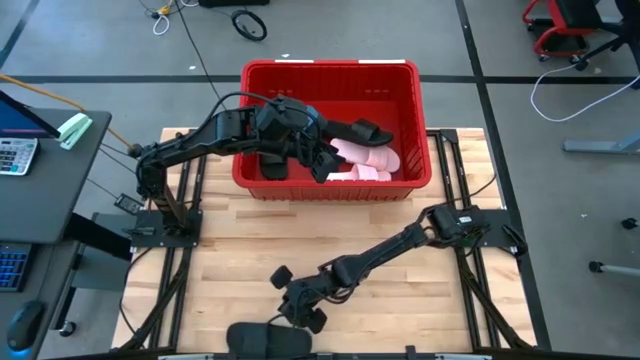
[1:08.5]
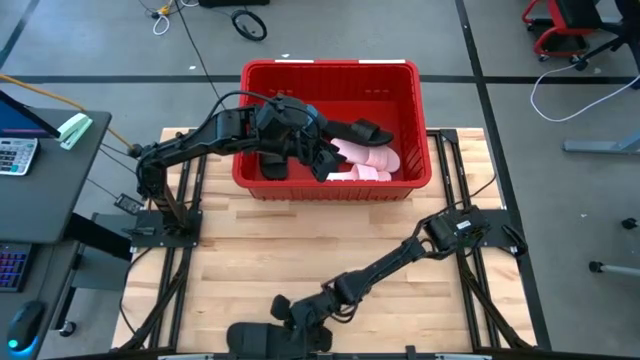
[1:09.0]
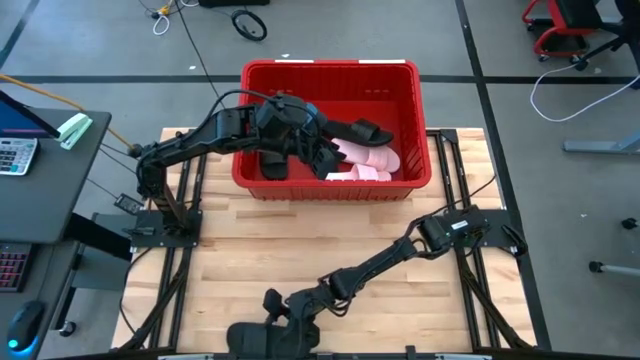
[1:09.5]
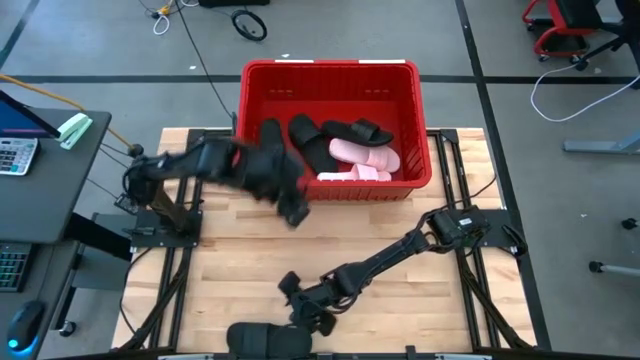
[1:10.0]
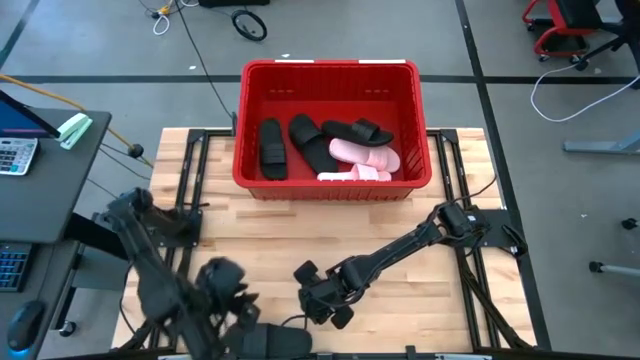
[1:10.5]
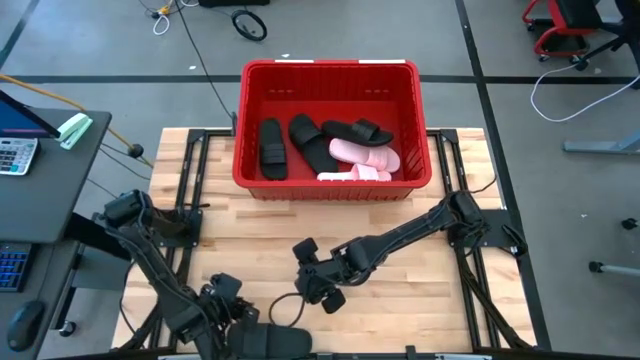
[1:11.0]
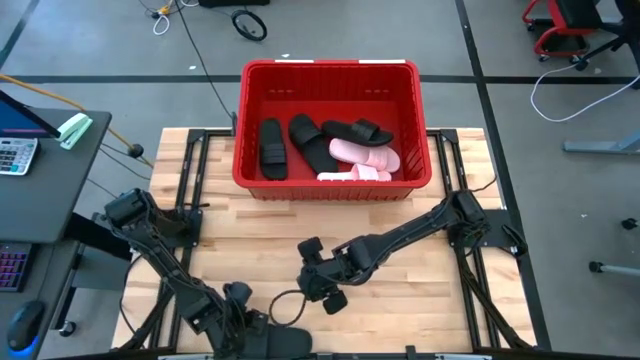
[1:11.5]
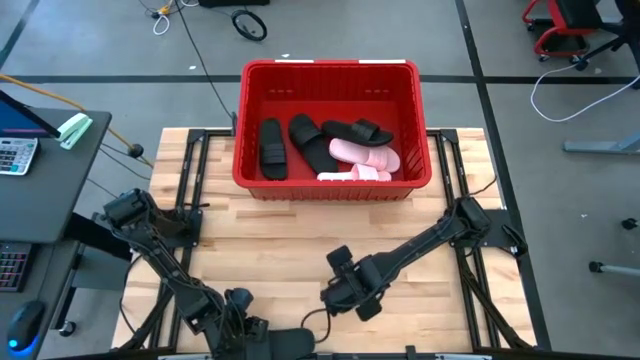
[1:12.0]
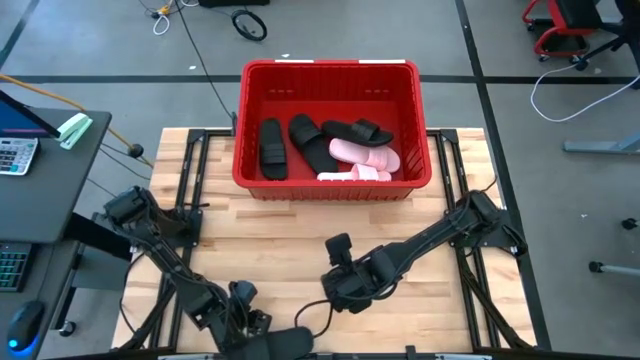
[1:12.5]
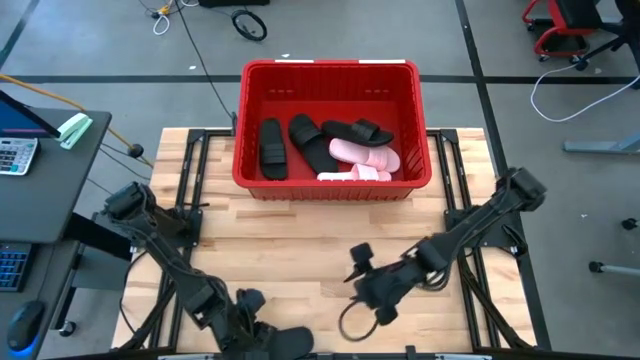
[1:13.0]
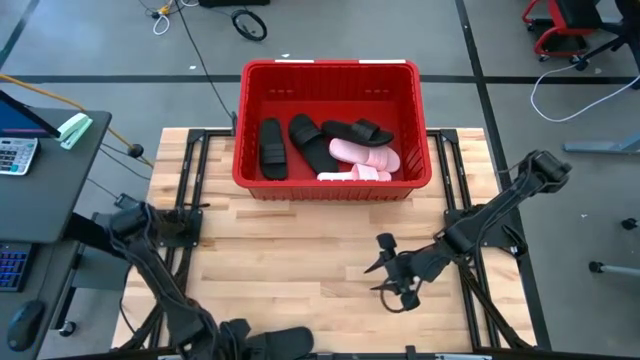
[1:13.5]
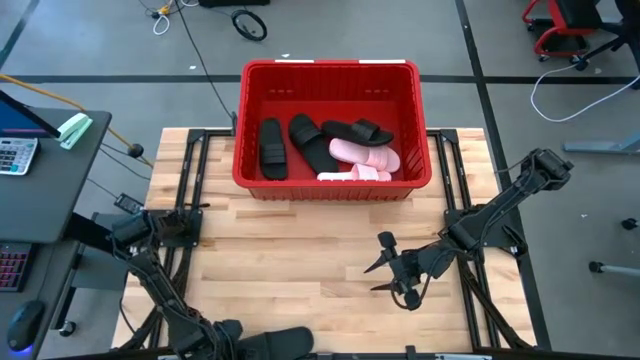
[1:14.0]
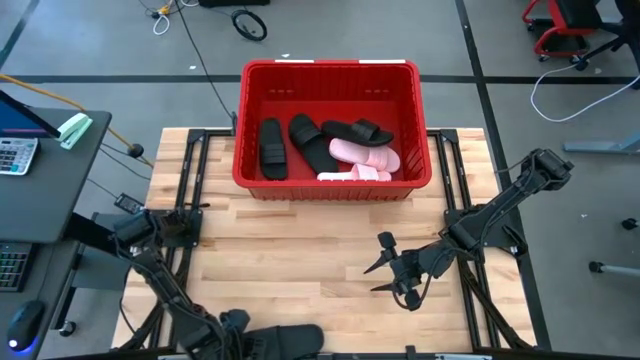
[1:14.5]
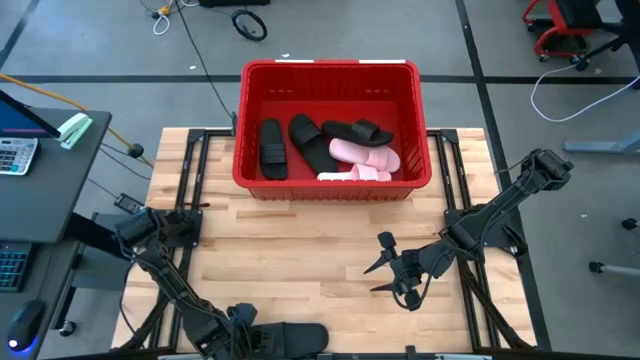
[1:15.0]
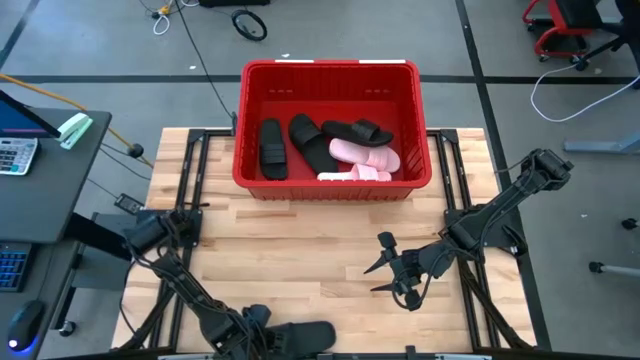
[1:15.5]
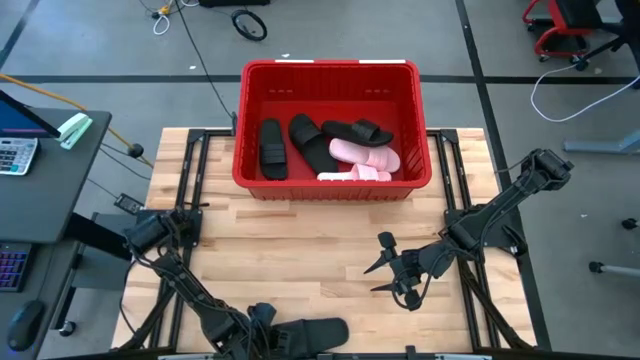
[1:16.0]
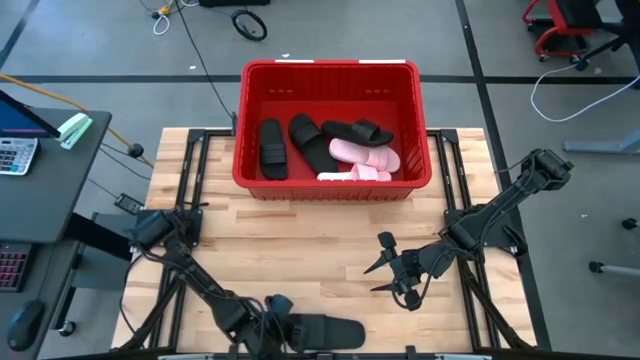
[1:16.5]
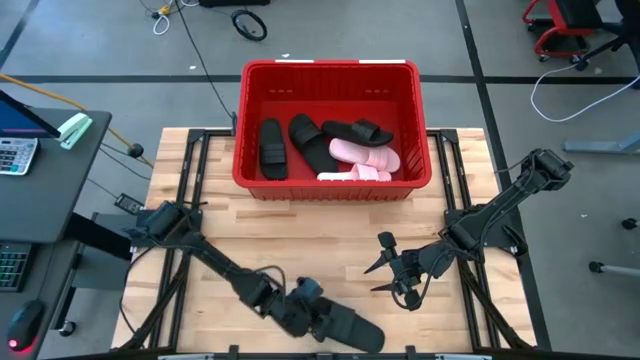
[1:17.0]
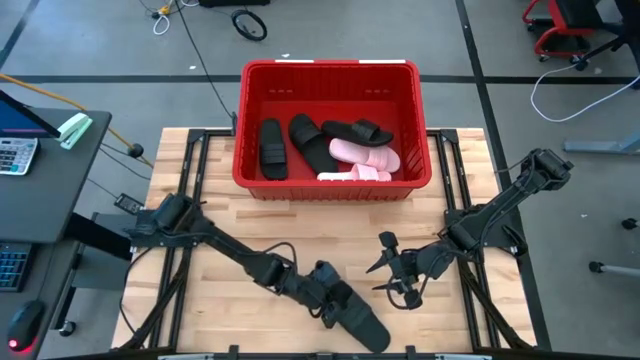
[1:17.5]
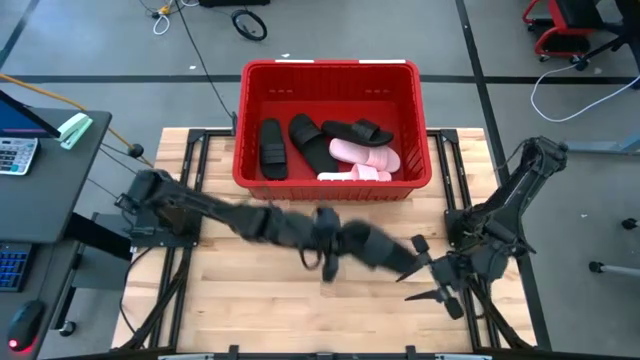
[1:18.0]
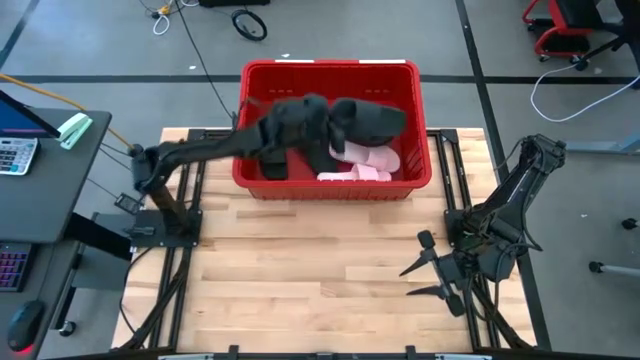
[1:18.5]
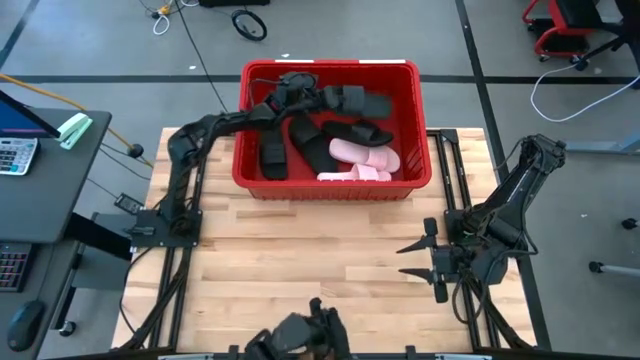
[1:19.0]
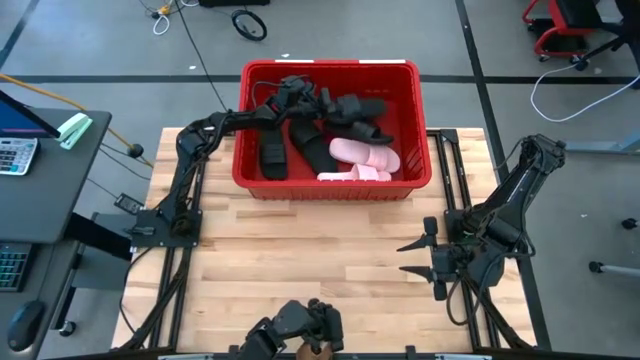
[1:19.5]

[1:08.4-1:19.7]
Task: Pick and place slides into bin
Put the black slide into the red bin

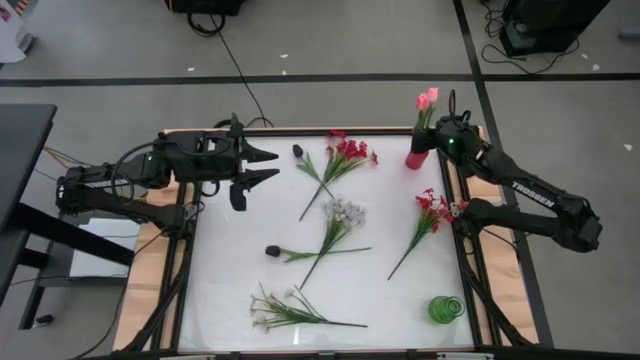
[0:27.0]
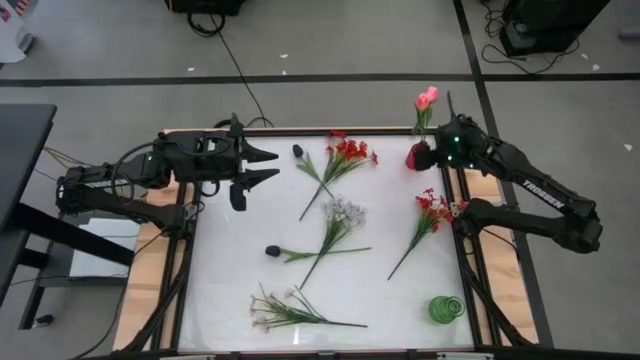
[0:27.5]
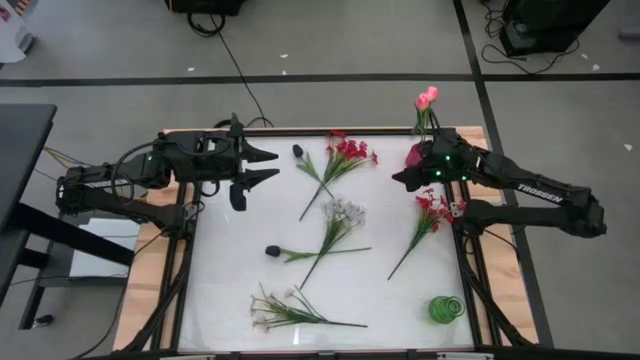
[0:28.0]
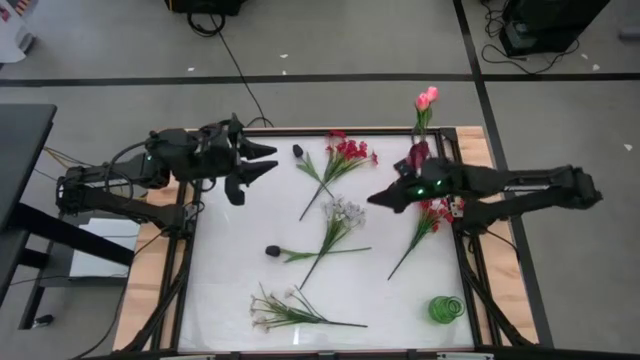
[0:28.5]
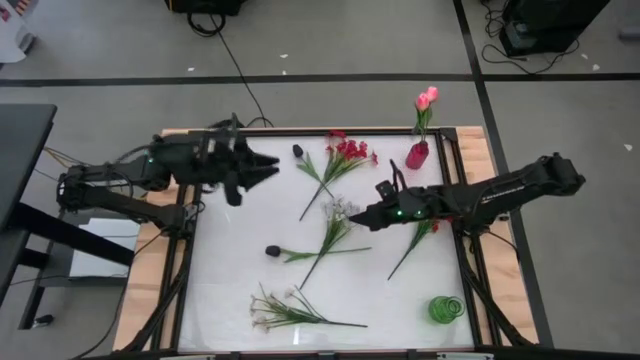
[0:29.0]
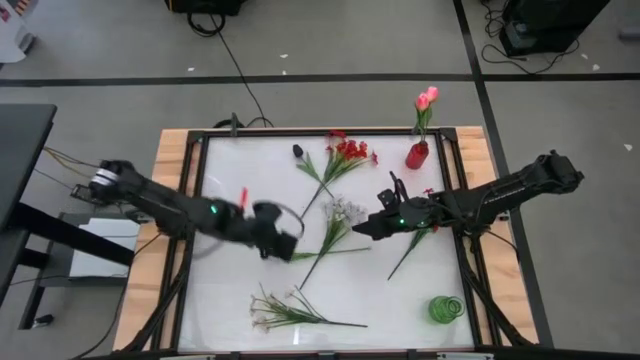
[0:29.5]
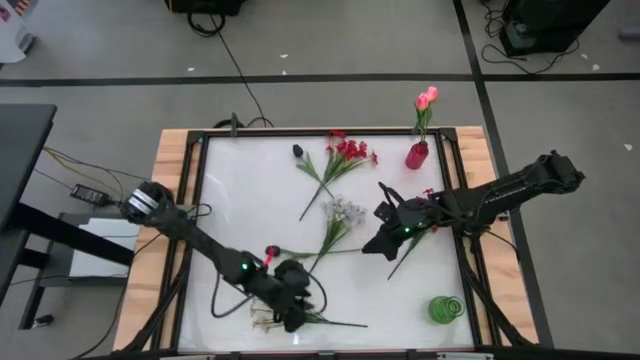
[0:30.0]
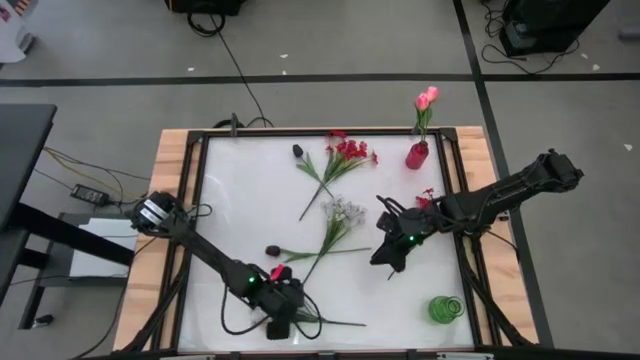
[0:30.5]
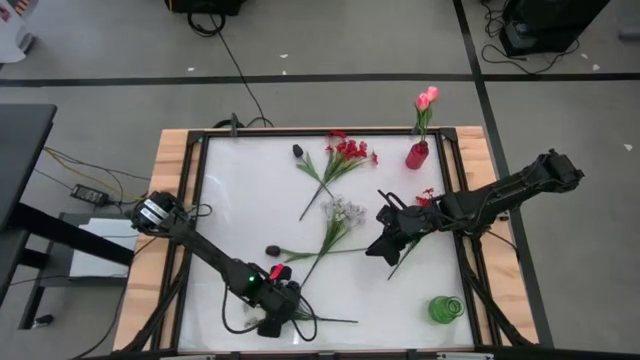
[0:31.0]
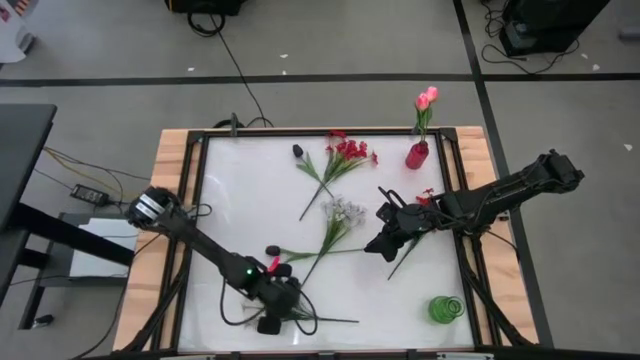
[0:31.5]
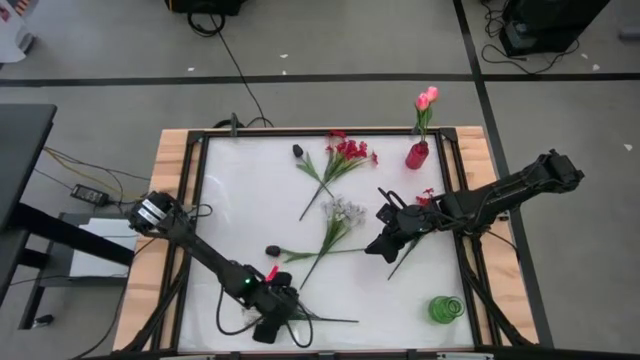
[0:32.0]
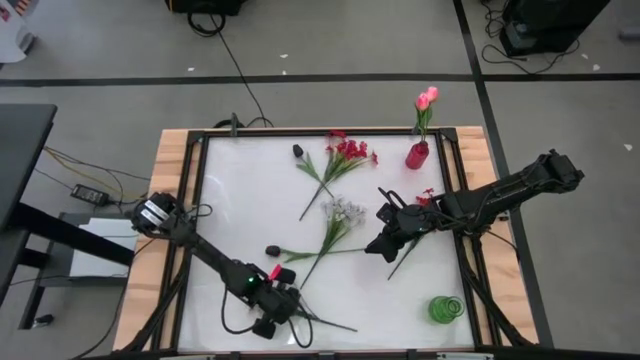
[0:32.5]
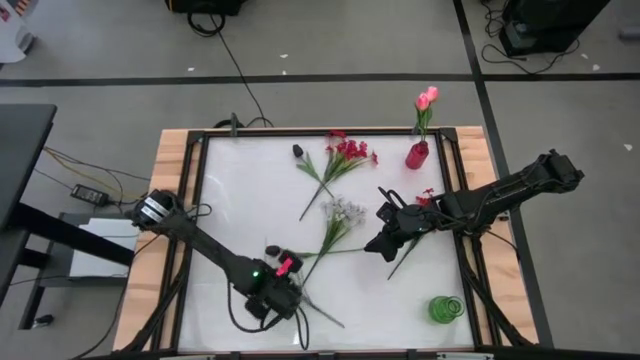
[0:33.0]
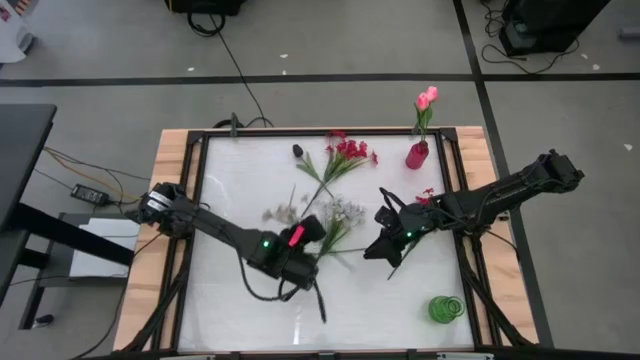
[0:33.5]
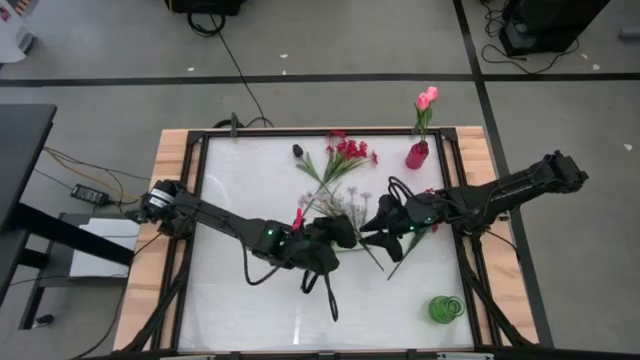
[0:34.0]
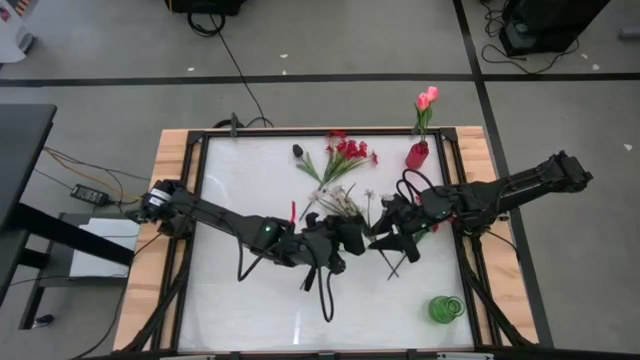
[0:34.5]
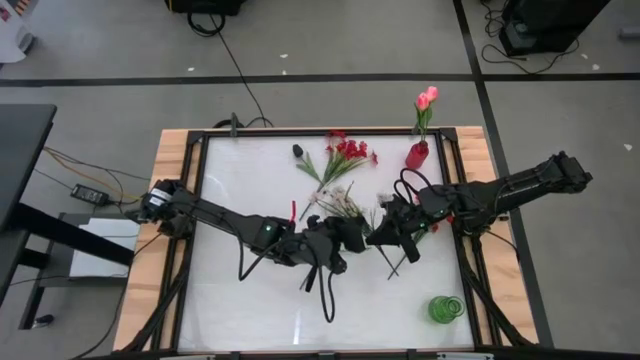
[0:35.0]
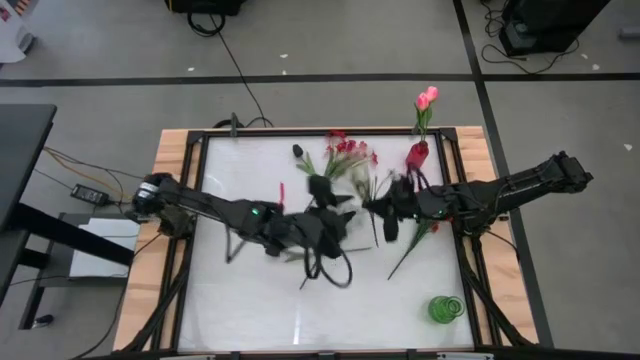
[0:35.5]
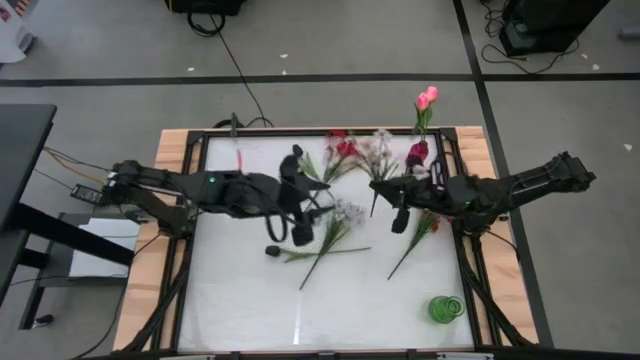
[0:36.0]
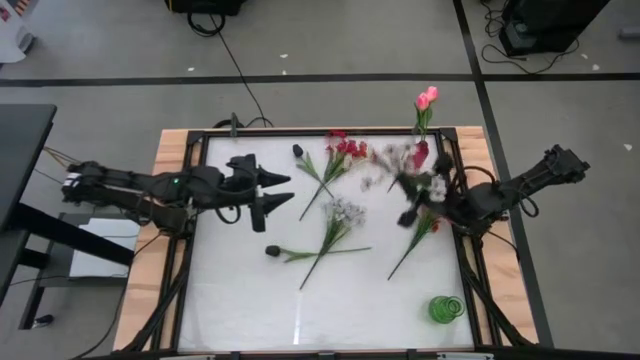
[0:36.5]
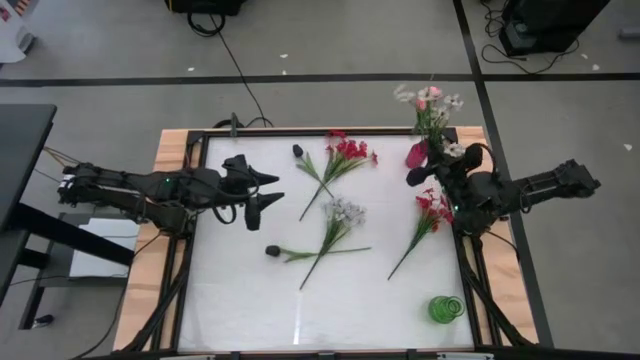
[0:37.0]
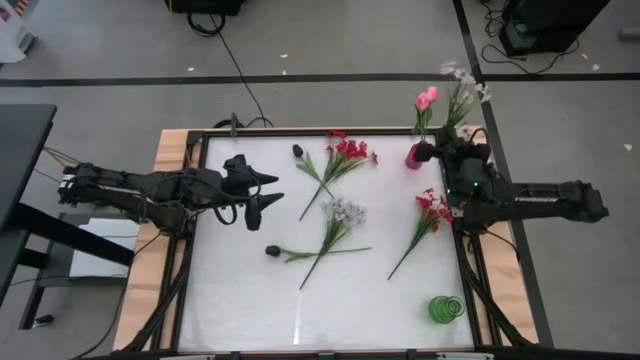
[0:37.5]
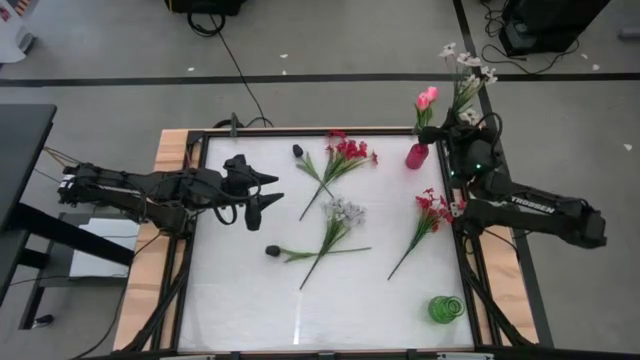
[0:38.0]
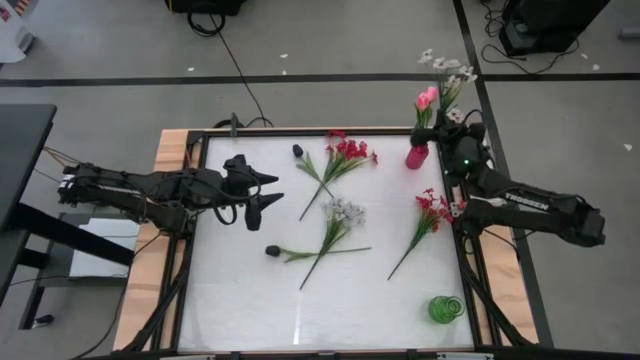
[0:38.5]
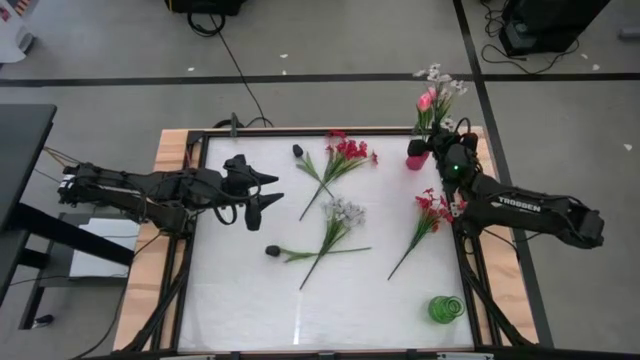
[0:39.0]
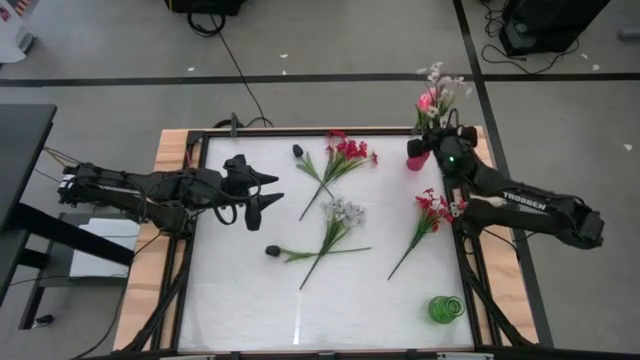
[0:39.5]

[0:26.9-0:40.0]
Task: Sort flowers into vase by color
Put the bottom white flowers into the red vase
